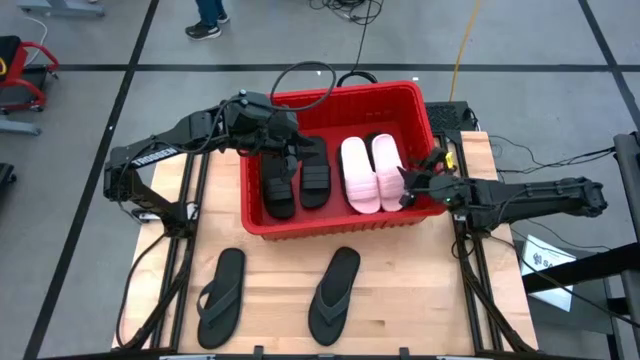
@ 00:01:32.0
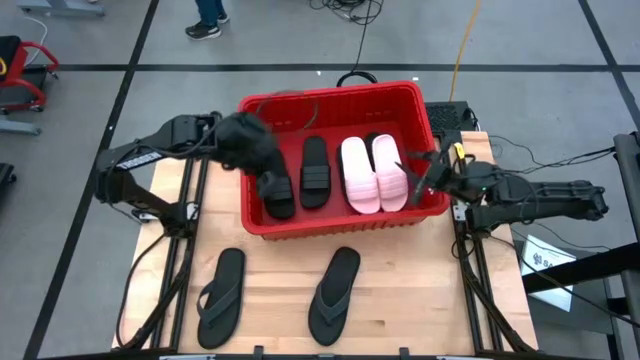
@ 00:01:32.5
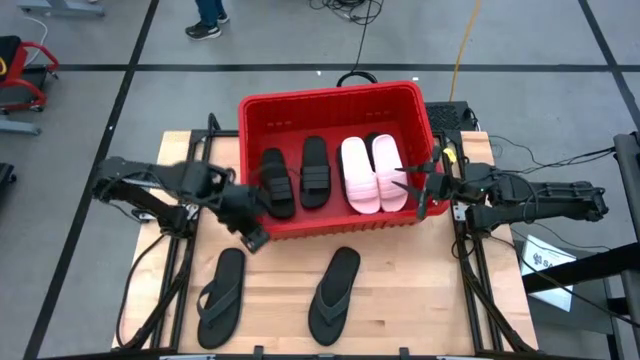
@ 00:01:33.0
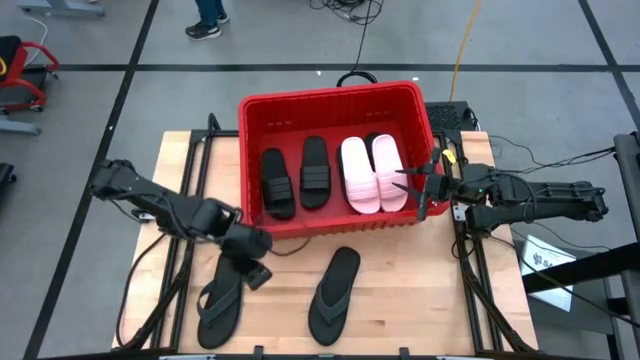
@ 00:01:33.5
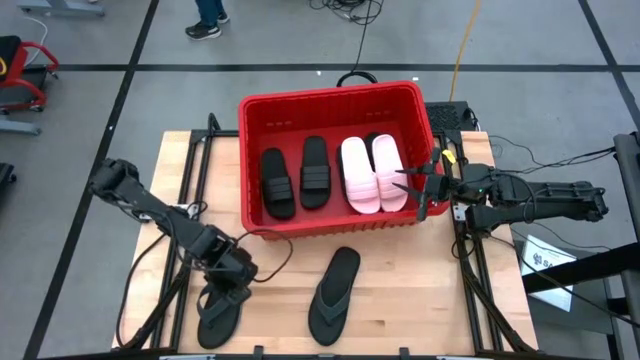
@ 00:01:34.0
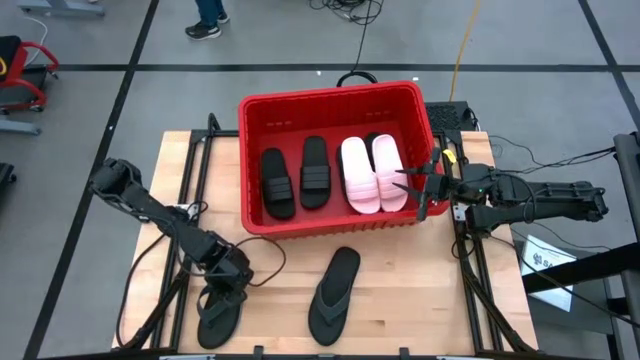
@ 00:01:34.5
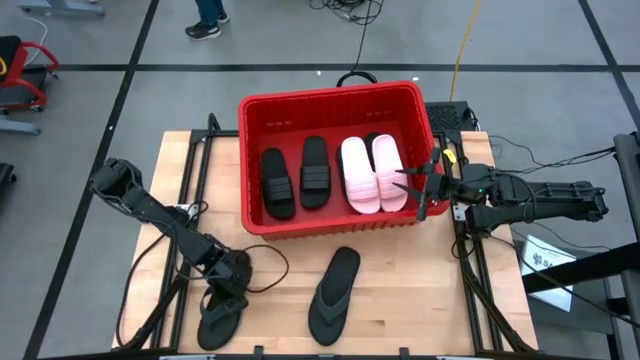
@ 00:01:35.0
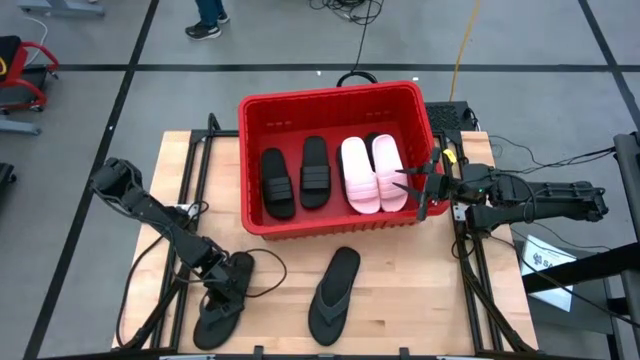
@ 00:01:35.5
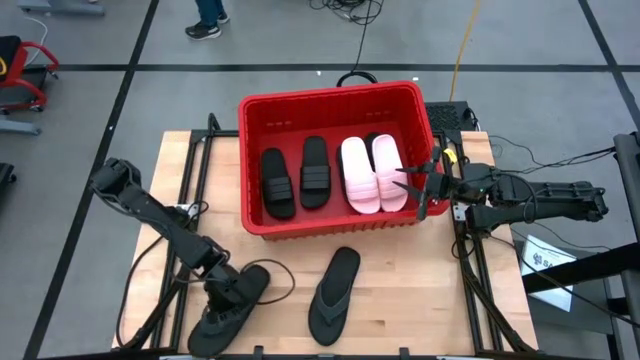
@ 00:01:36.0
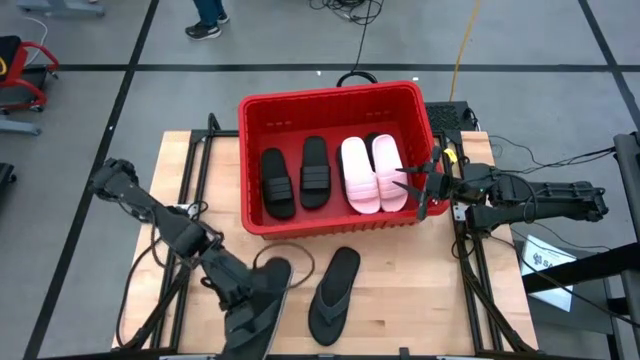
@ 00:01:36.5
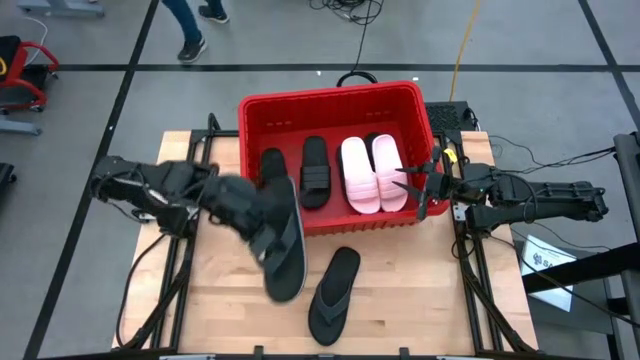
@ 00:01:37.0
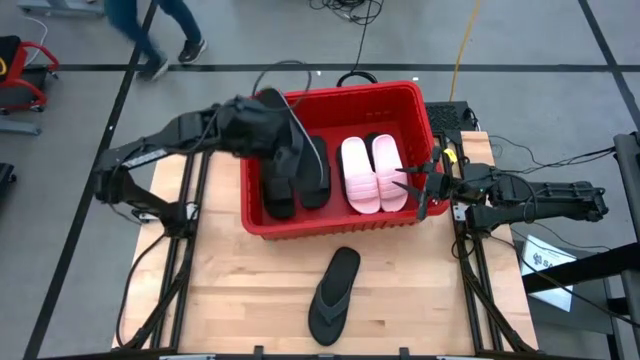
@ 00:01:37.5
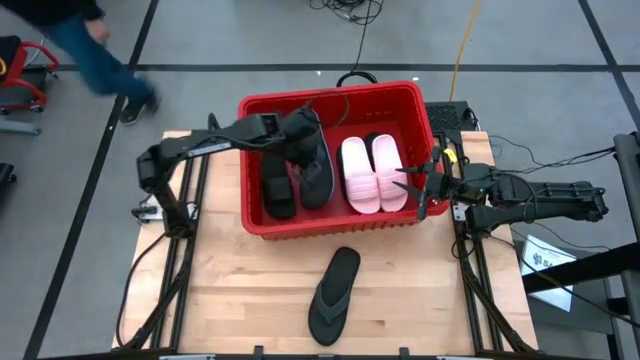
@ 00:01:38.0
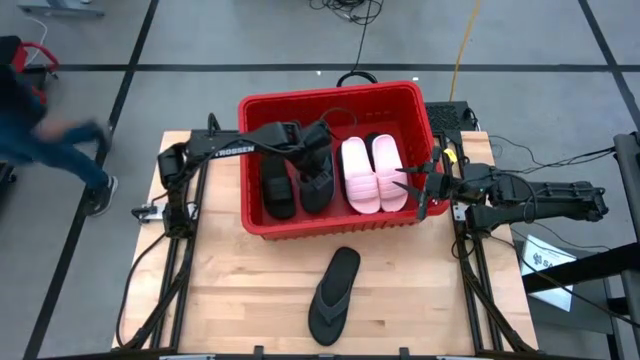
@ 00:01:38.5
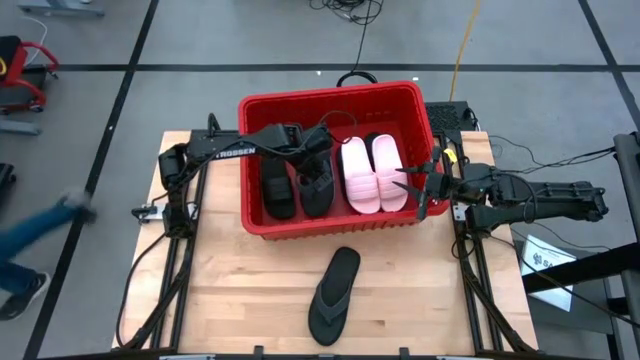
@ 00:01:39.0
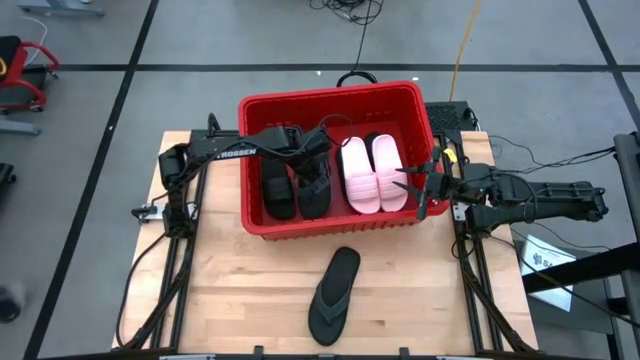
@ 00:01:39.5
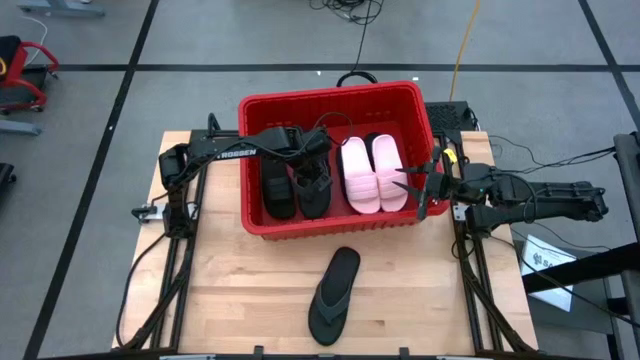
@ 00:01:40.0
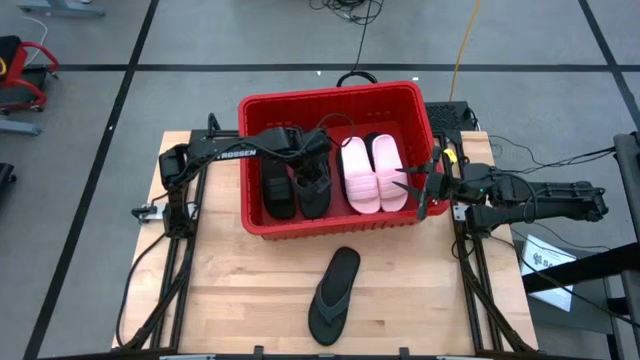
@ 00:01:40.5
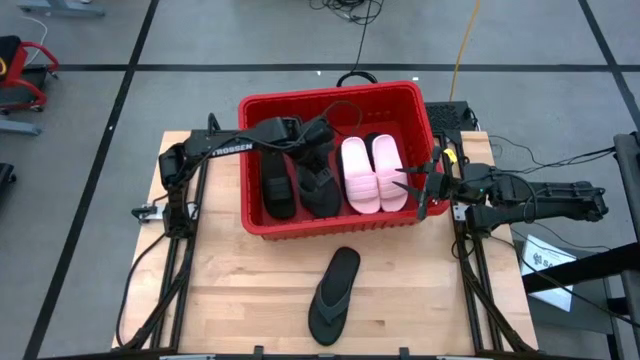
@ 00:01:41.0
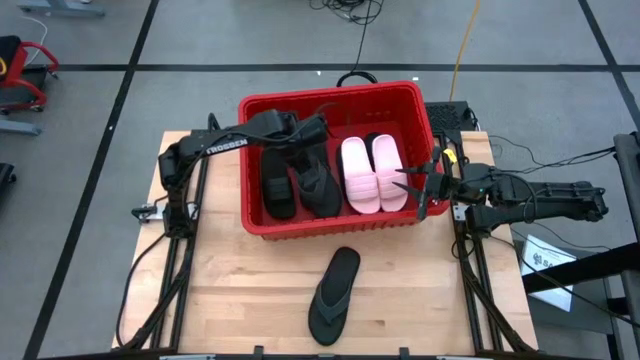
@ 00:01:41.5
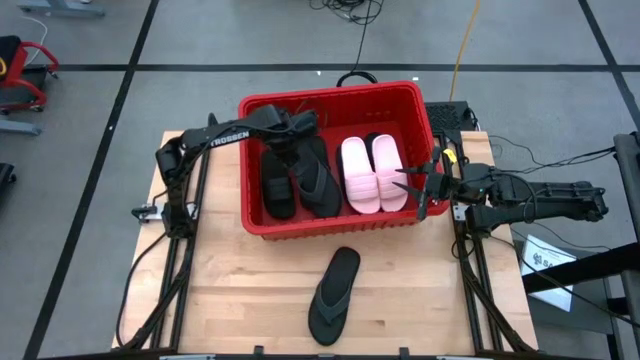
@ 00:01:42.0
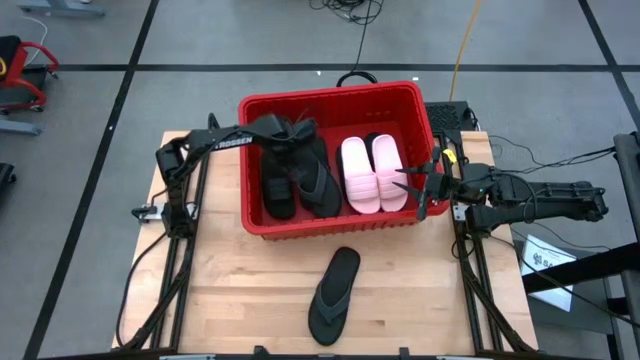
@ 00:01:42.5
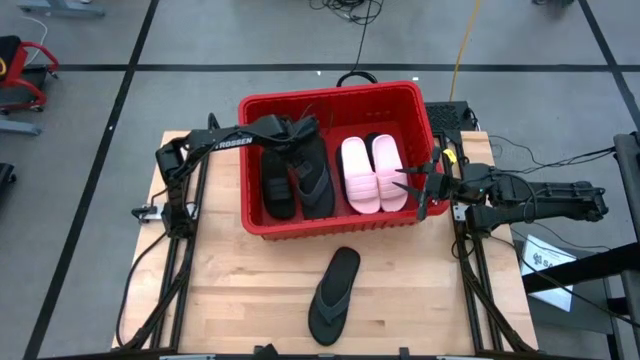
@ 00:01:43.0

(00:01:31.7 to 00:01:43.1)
Task: Pick and place slides into bin
Put the black slipper into the red organizer bin

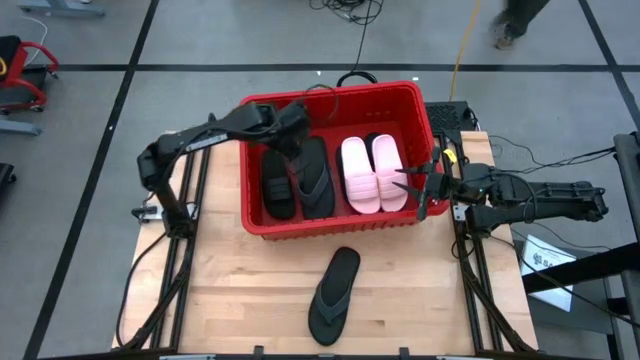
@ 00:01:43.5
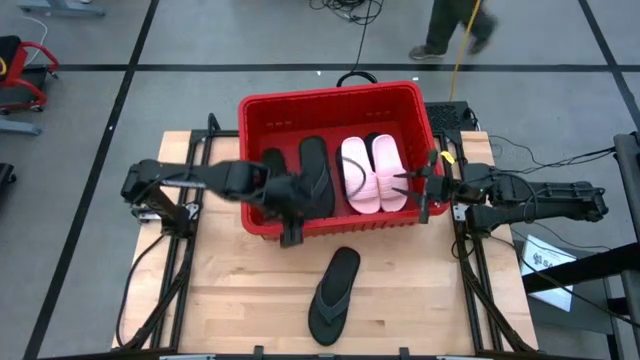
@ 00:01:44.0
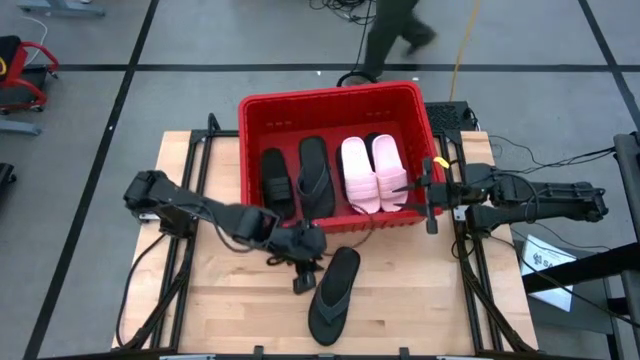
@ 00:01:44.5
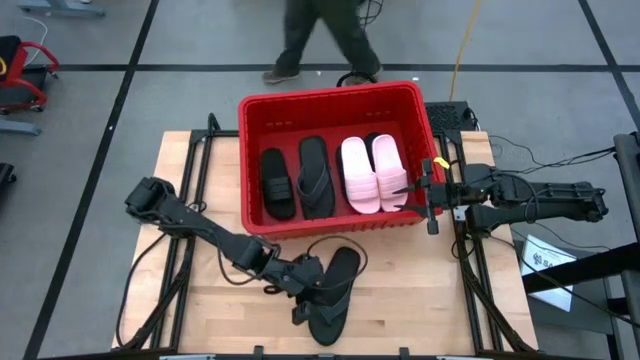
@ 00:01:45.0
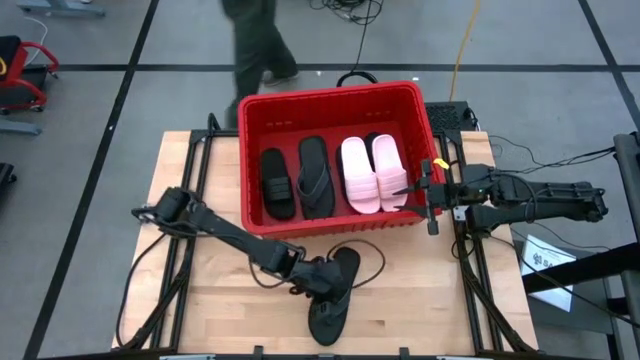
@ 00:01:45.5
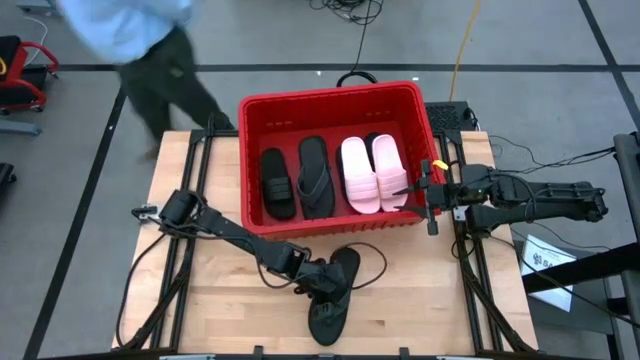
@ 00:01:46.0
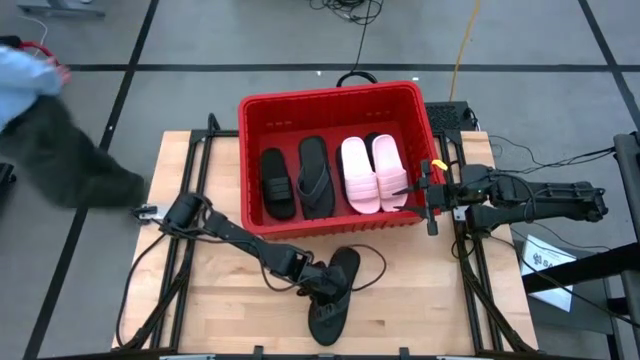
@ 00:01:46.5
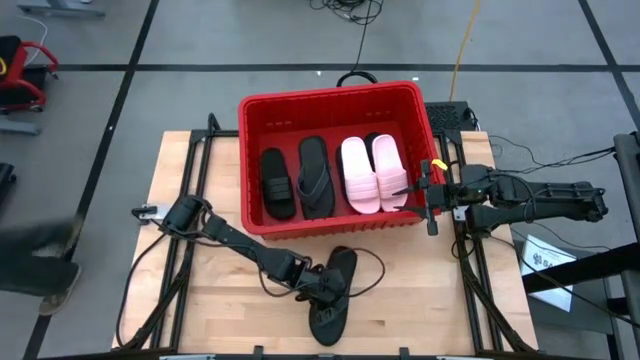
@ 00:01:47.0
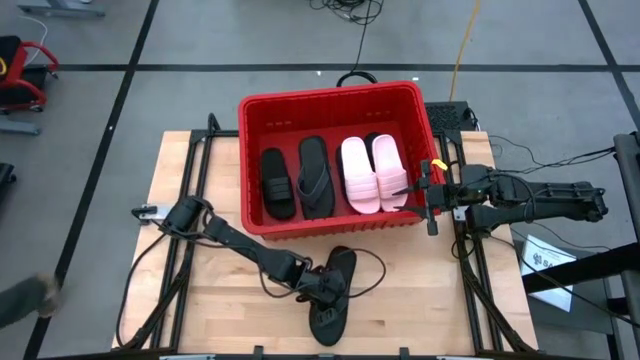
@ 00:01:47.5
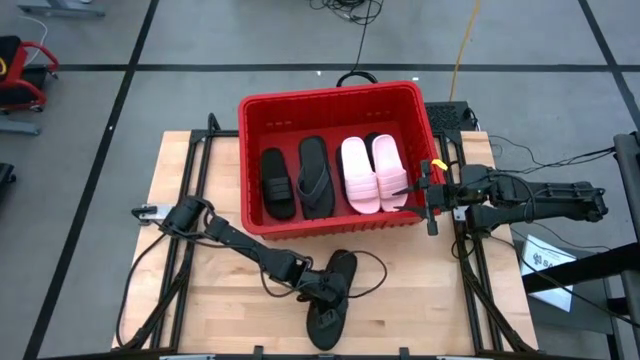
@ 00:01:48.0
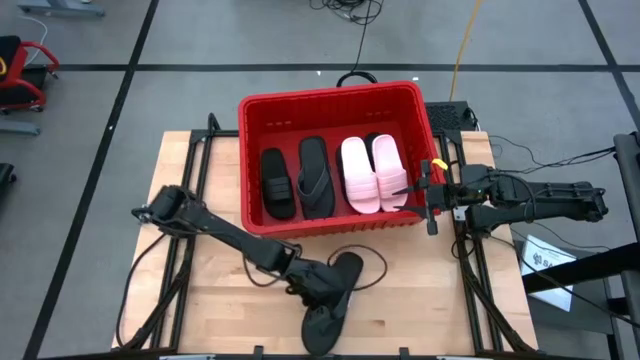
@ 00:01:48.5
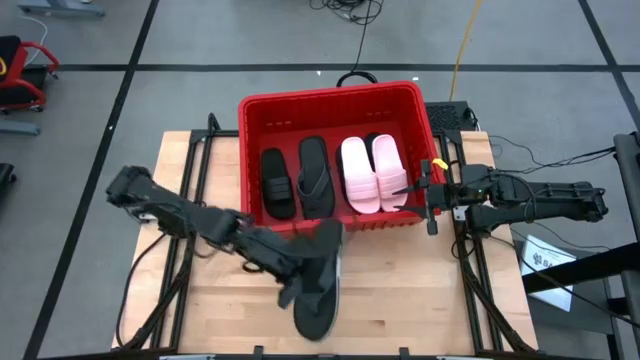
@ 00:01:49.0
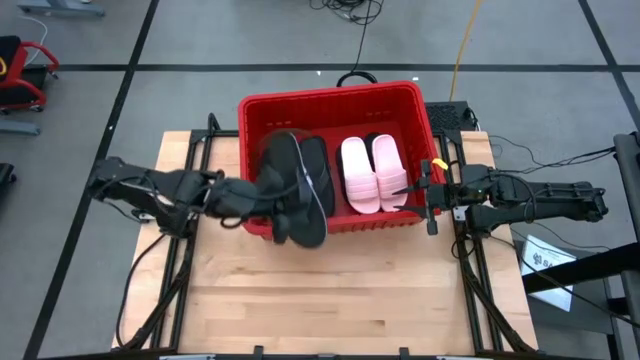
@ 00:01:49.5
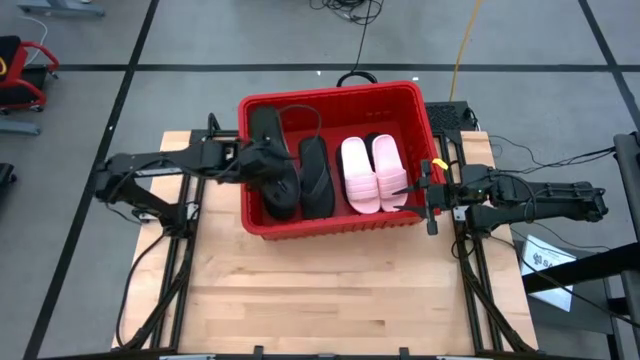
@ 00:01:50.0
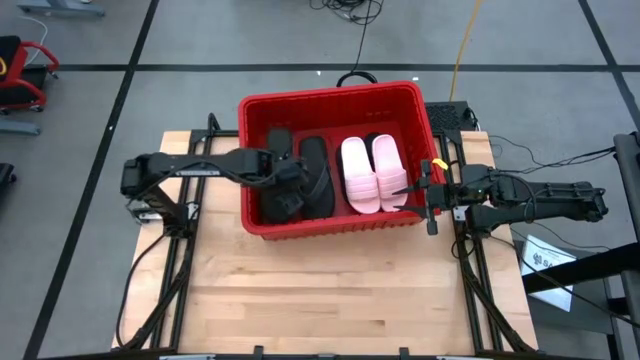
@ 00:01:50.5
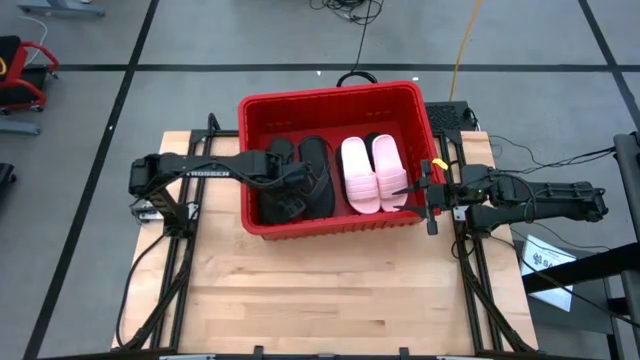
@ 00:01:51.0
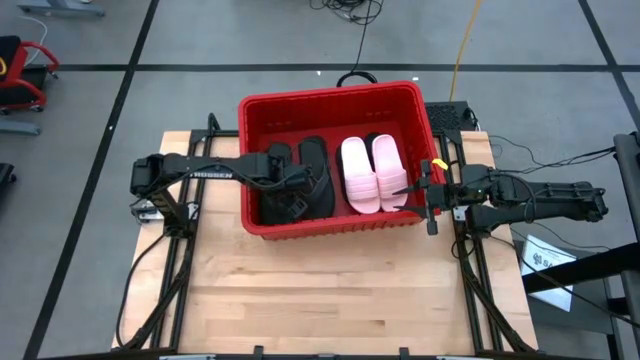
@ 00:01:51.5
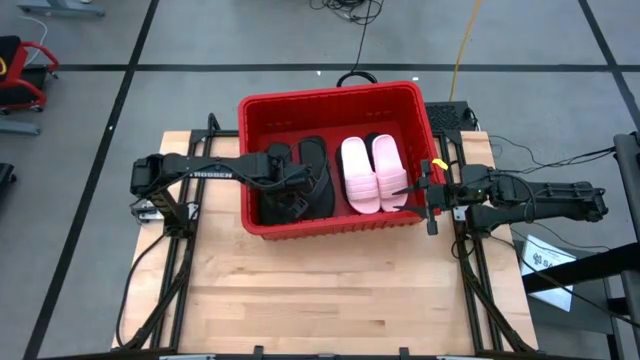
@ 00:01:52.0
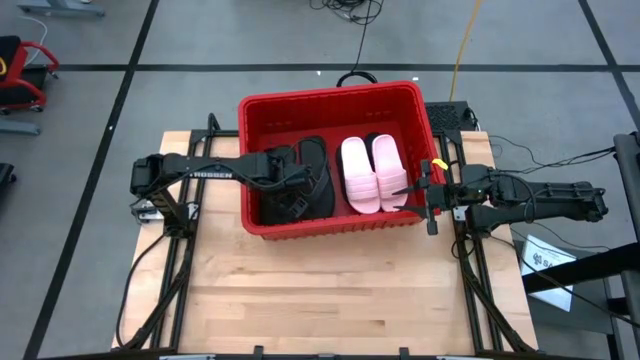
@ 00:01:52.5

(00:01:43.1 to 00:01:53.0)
Put the black slipper into the red organizer bin
